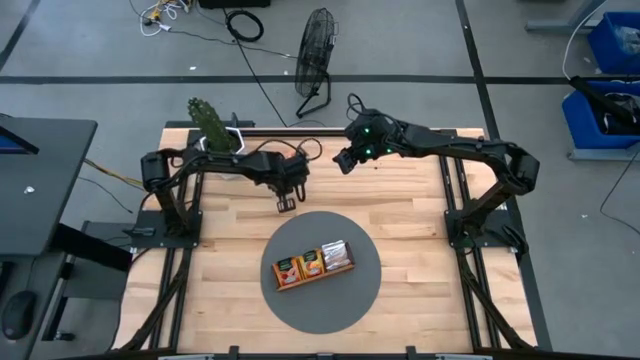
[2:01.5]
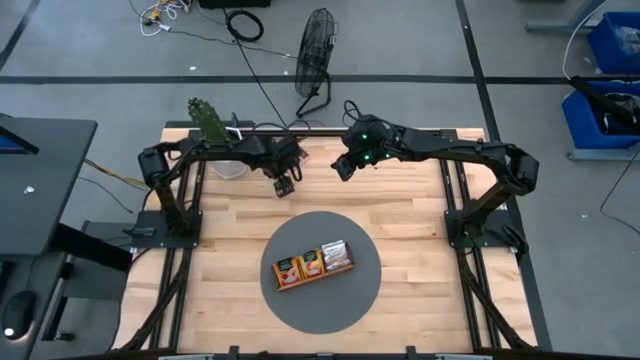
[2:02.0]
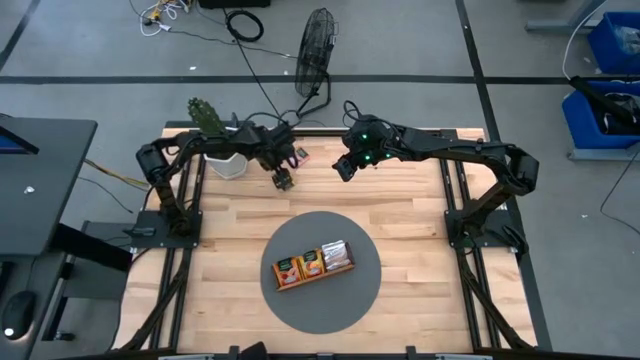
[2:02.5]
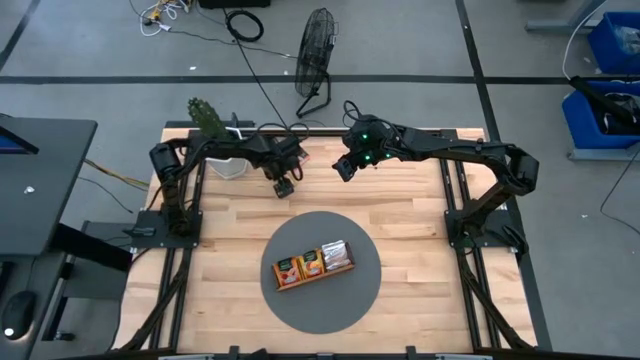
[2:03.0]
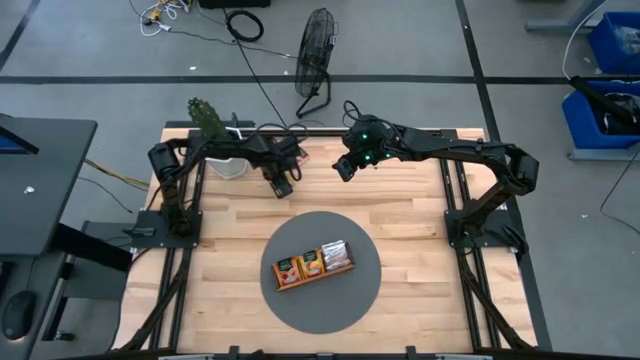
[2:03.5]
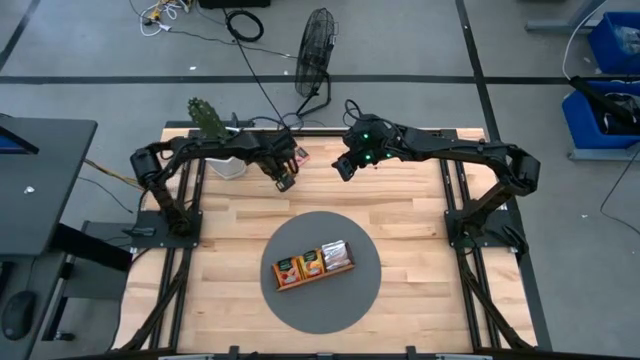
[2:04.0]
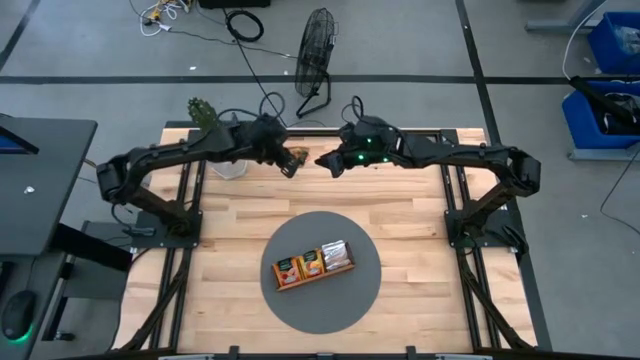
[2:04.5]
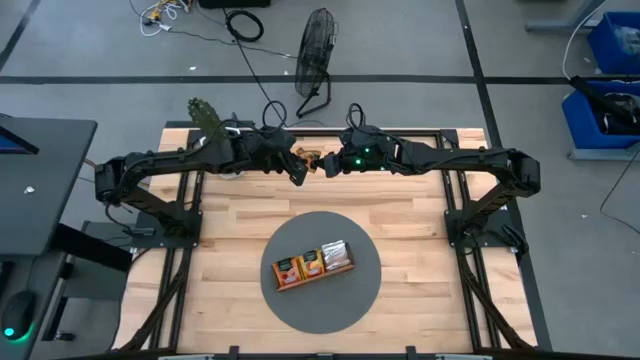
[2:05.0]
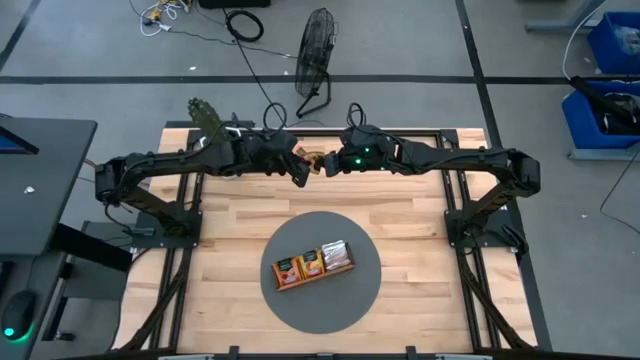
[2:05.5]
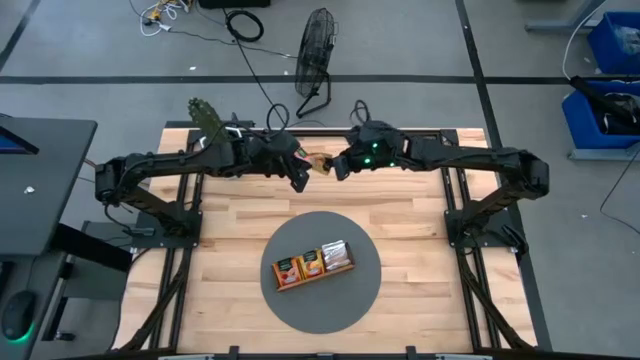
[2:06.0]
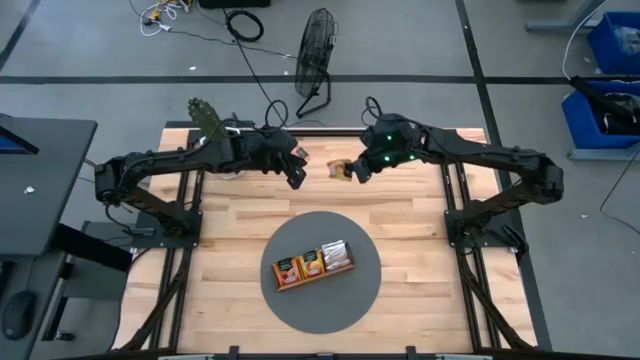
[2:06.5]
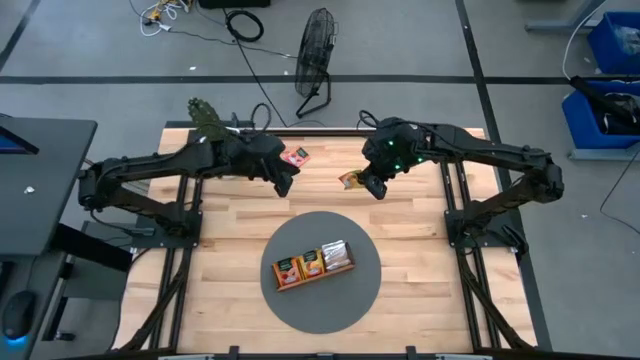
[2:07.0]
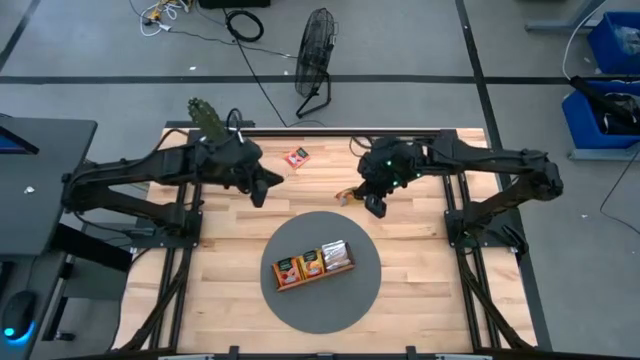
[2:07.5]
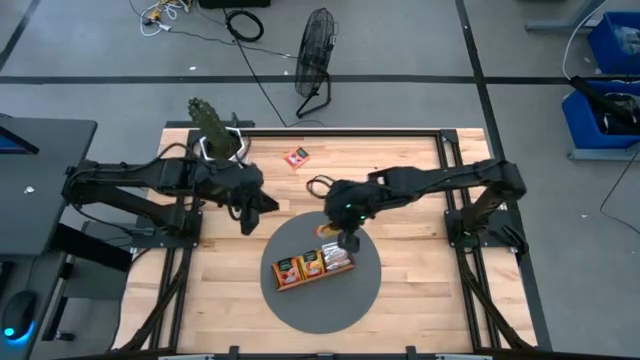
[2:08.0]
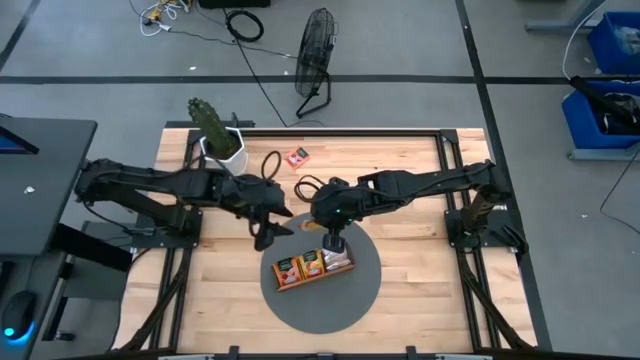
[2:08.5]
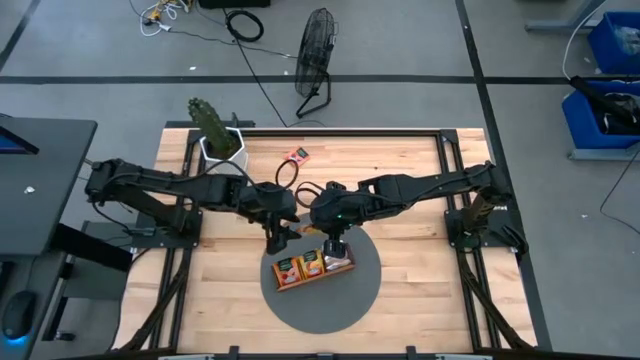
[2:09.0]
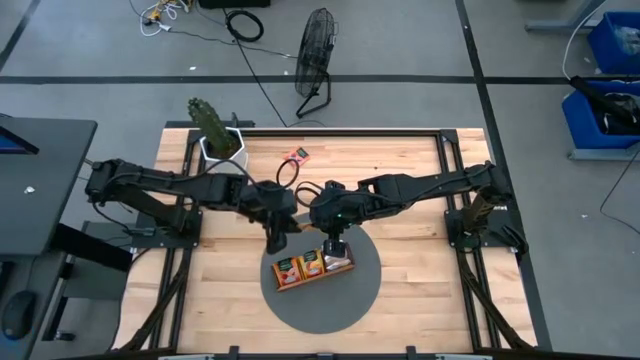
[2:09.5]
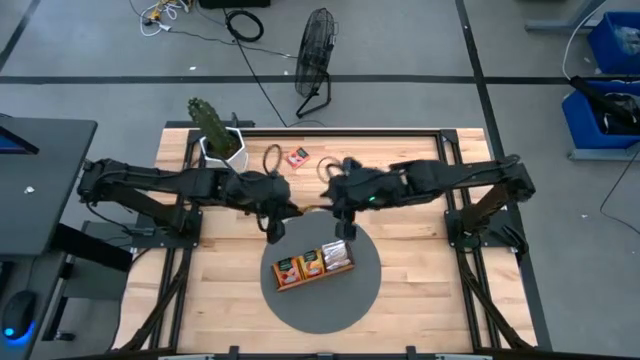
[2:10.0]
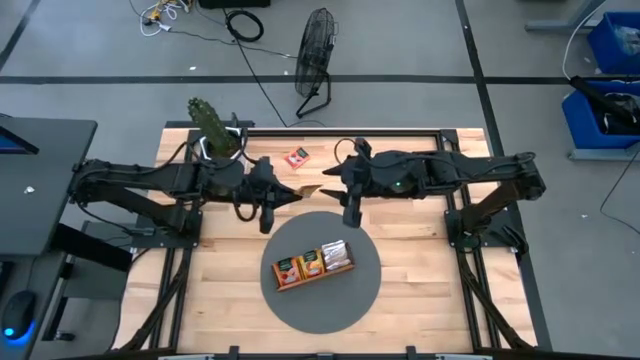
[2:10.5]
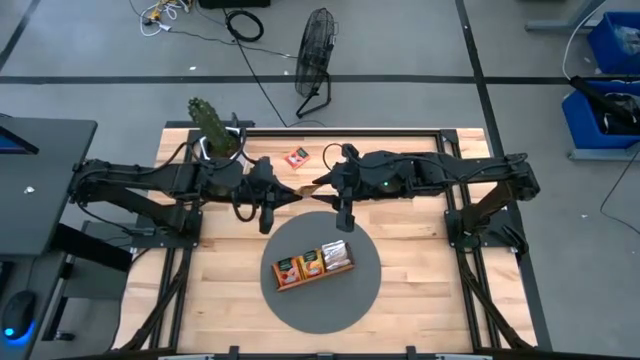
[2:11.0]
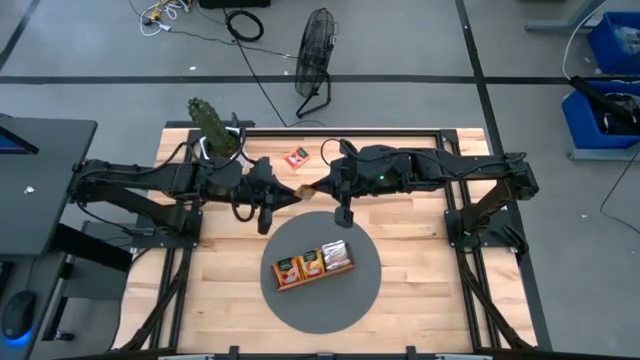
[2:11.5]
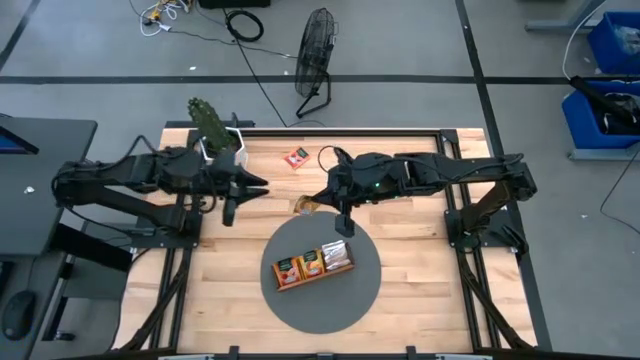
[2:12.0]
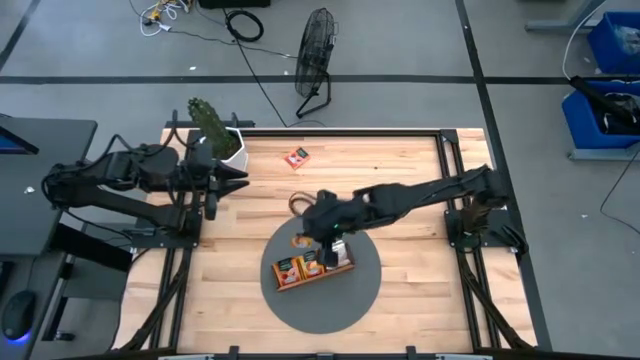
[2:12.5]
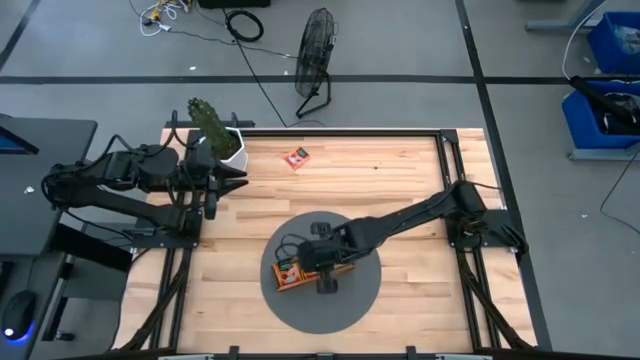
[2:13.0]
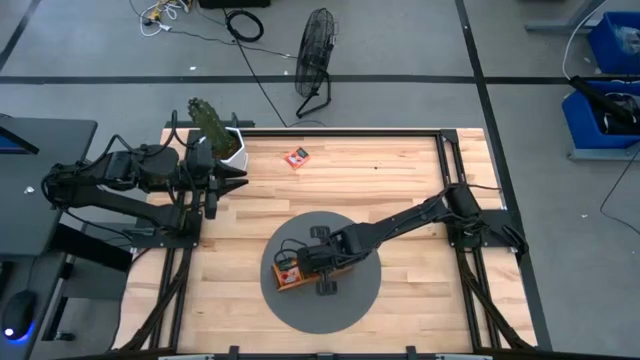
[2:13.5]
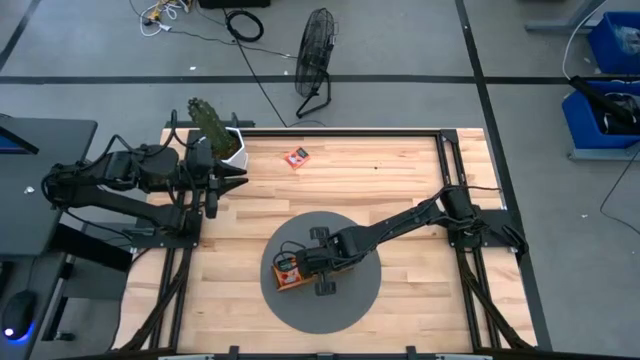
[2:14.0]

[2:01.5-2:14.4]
Task: Pick & Place Tea
Put the yellow tea bag into the middle section of the wooden organizer

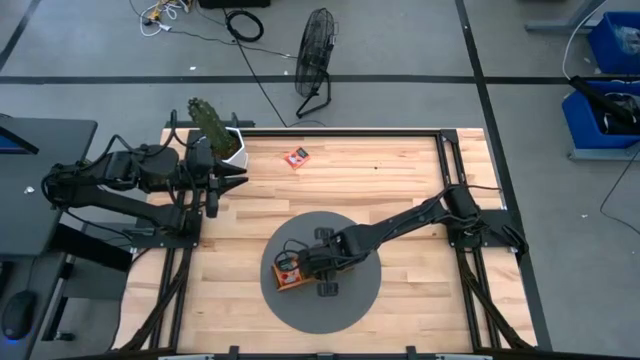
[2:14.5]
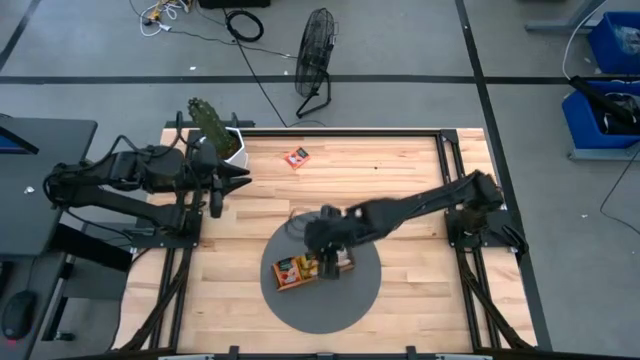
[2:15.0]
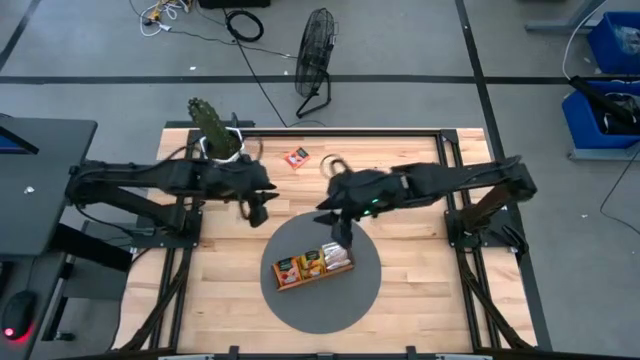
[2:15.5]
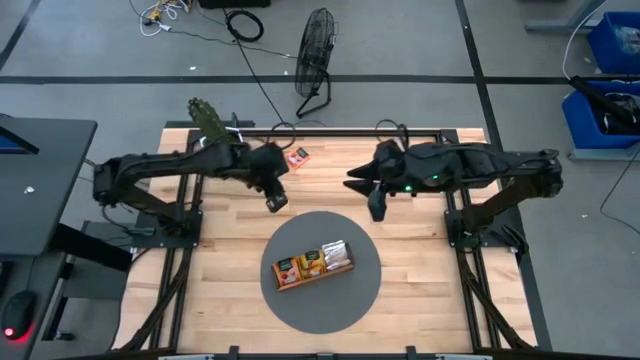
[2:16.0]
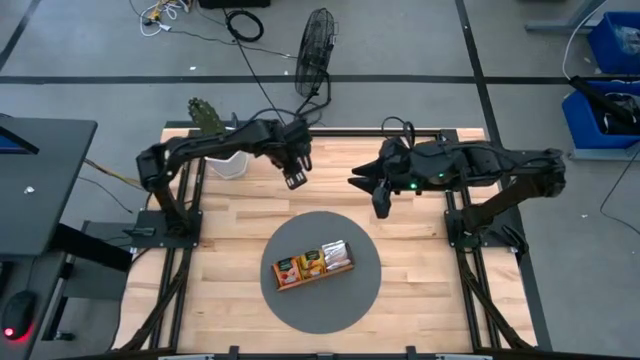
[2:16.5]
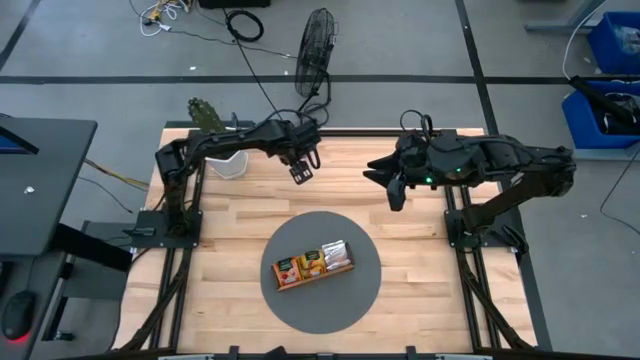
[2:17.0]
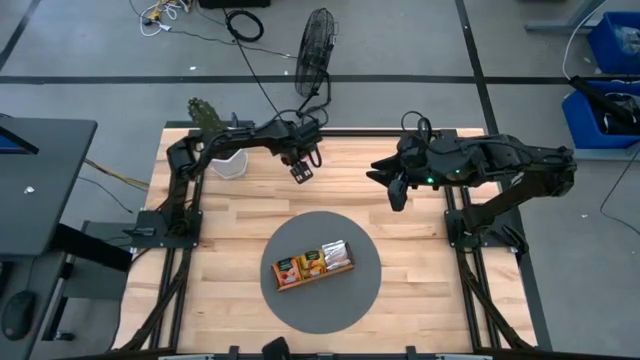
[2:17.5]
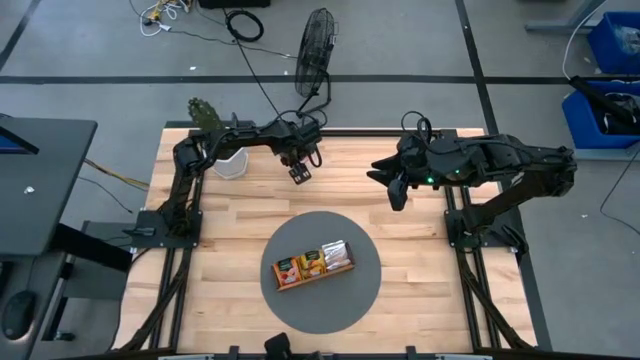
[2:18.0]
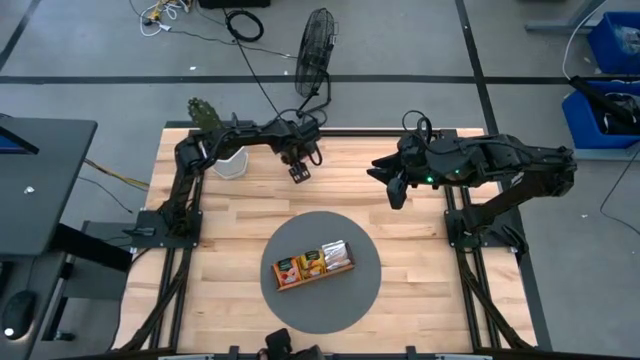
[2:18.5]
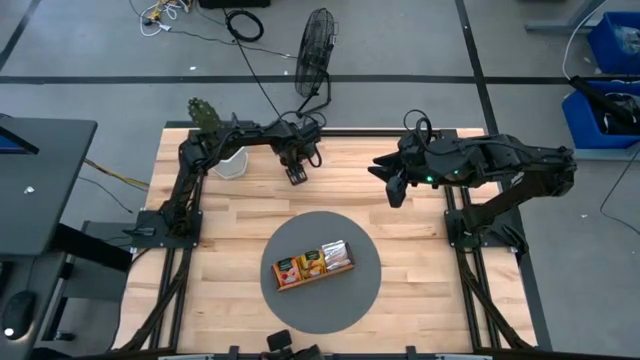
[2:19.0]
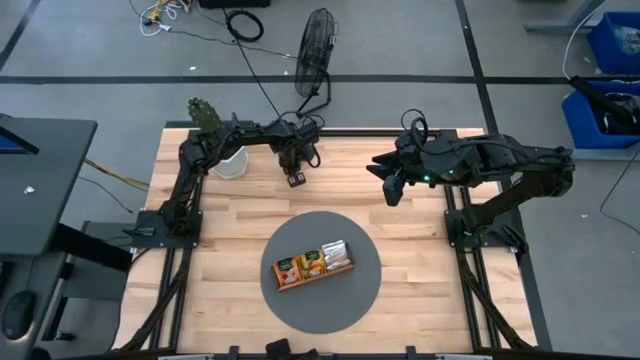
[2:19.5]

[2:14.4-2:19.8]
Put the orange tea bag into the left section of the wooden organizer
